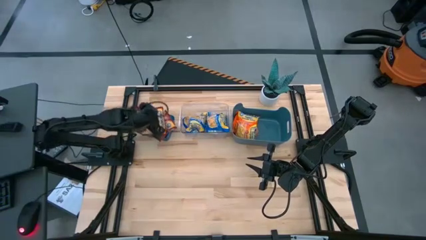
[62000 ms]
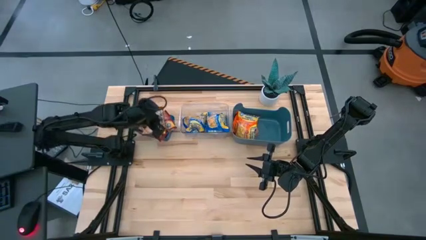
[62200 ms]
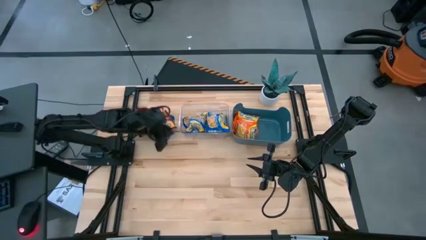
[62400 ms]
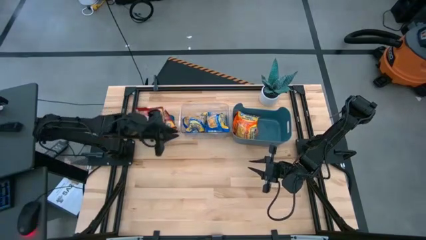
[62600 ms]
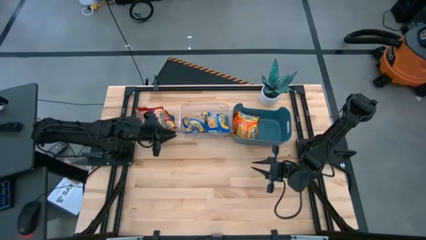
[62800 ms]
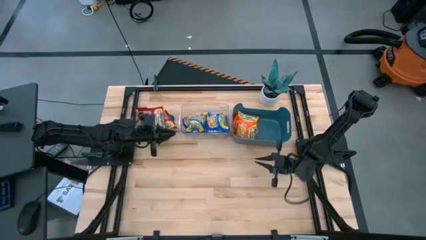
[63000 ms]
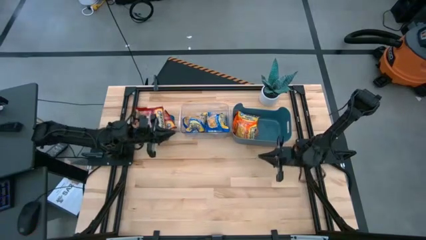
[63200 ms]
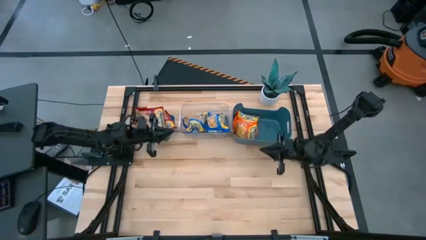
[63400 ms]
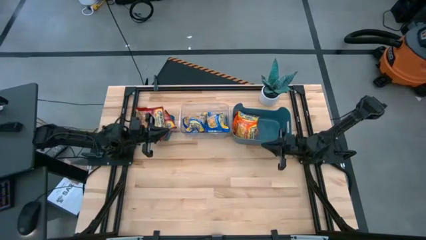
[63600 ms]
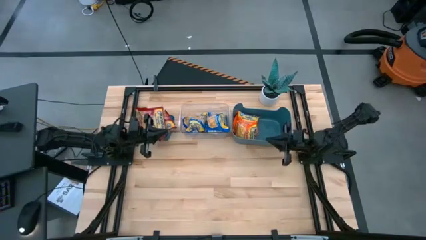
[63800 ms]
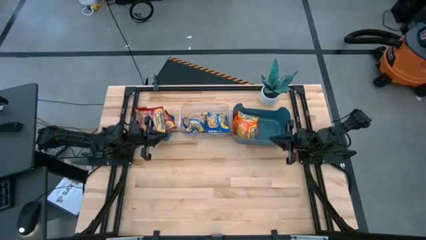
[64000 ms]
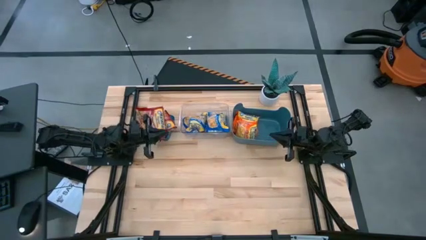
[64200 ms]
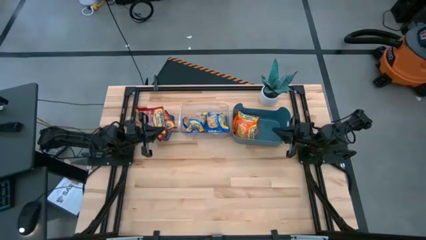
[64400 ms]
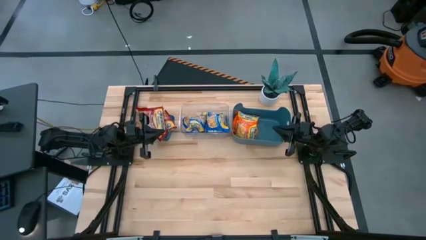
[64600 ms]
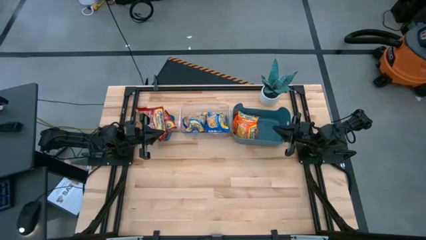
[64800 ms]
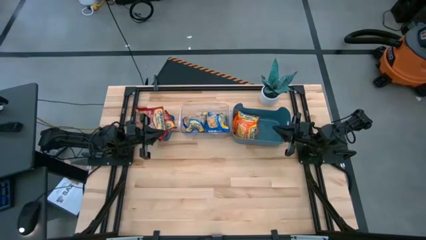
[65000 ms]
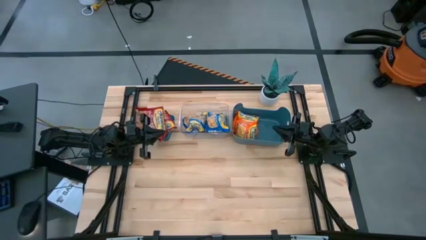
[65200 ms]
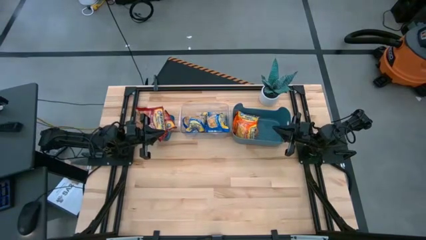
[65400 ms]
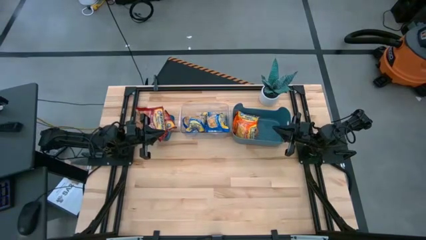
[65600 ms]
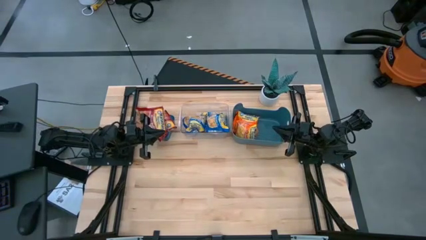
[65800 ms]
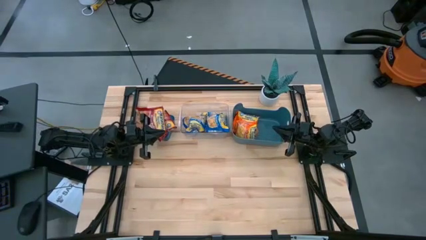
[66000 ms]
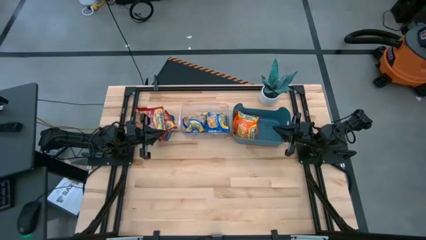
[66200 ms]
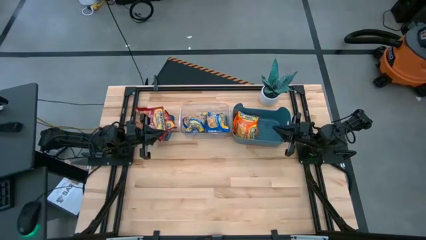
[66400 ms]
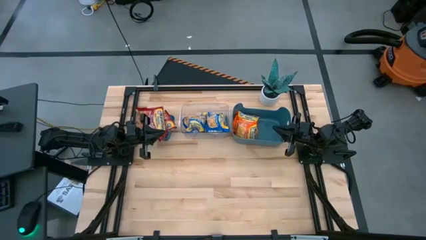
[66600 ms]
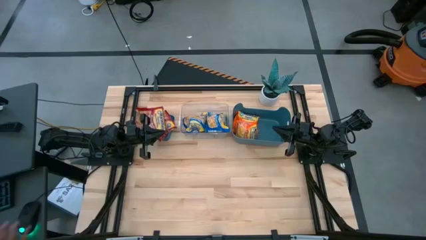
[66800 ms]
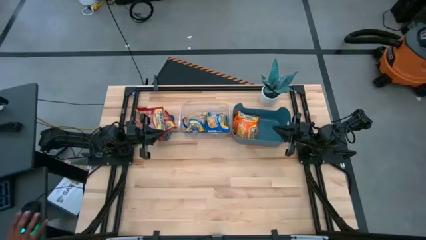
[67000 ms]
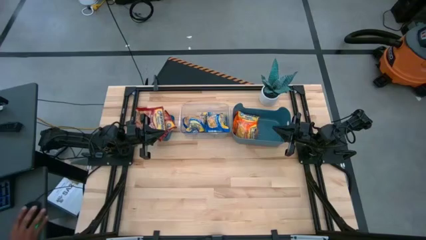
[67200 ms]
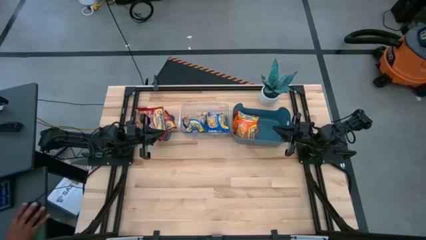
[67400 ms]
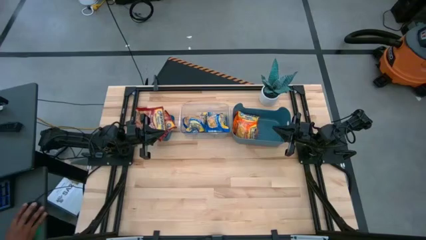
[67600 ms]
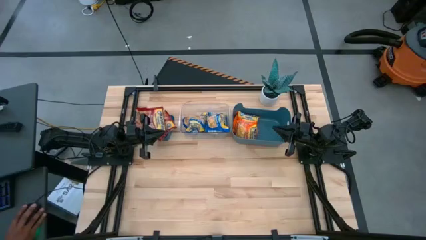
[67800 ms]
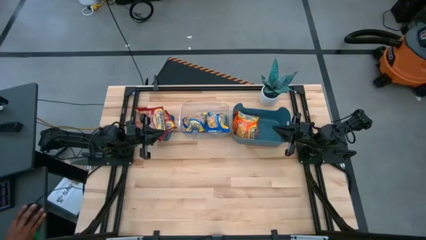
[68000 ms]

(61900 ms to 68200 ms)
Task: Sort Maruchan noodles
Return to Home Position

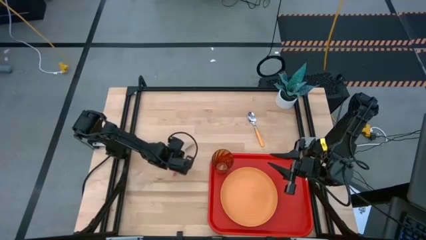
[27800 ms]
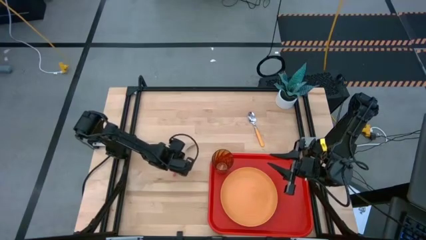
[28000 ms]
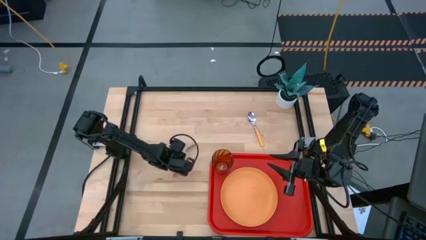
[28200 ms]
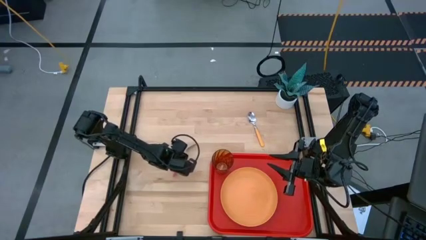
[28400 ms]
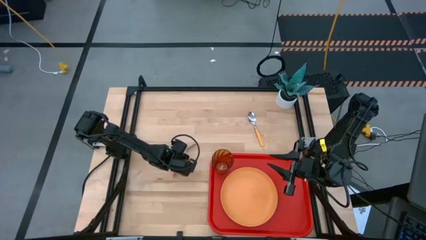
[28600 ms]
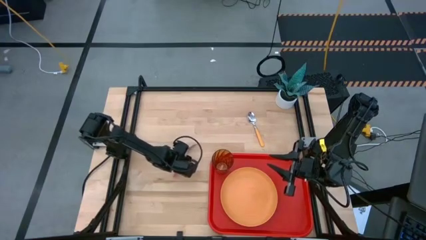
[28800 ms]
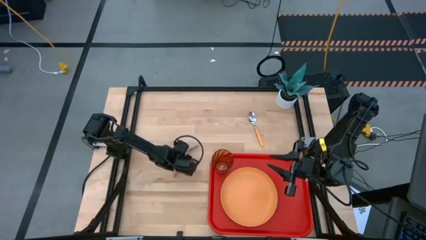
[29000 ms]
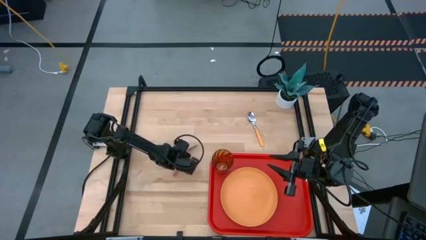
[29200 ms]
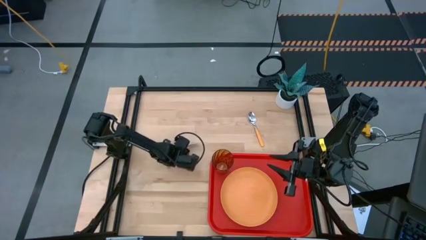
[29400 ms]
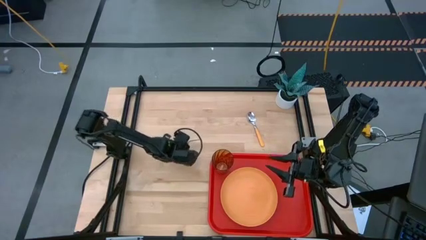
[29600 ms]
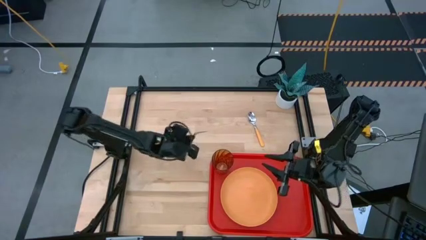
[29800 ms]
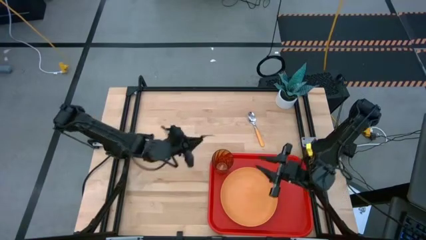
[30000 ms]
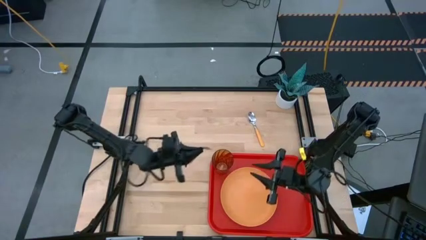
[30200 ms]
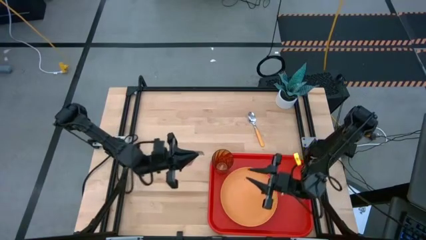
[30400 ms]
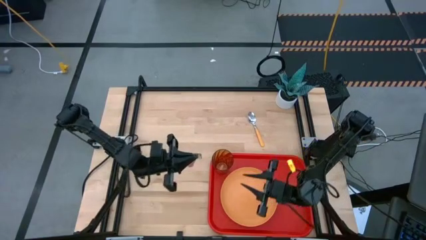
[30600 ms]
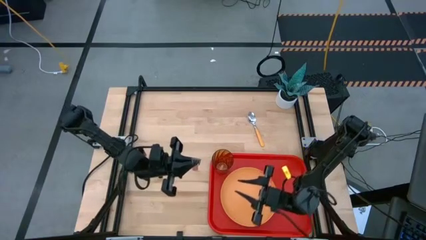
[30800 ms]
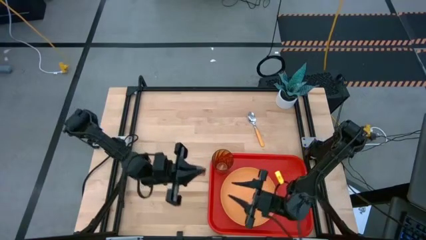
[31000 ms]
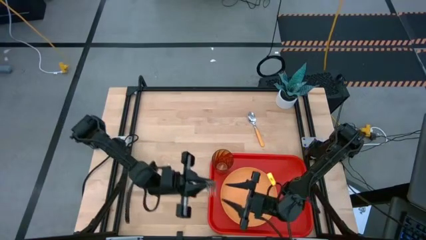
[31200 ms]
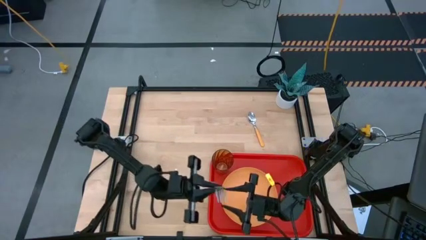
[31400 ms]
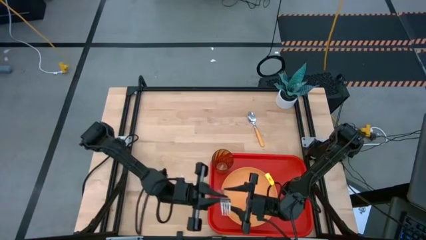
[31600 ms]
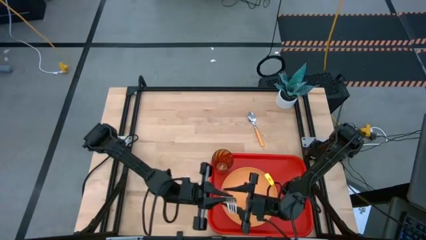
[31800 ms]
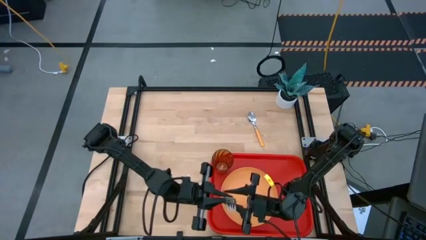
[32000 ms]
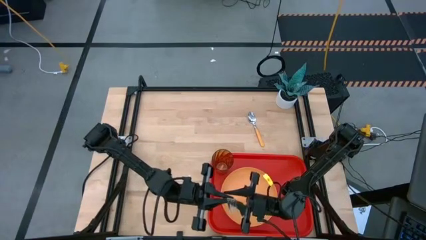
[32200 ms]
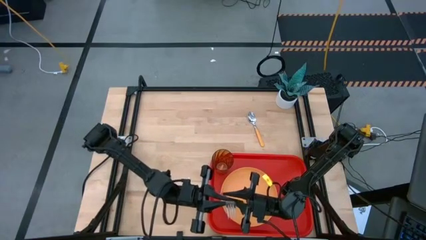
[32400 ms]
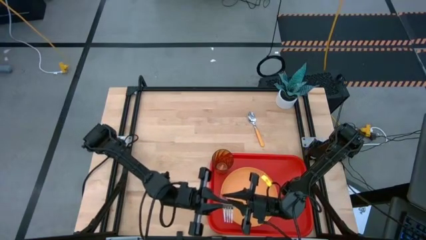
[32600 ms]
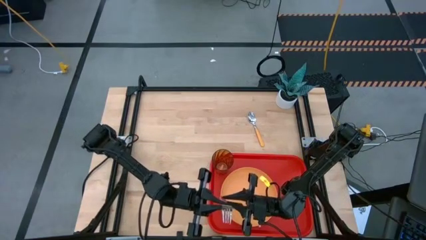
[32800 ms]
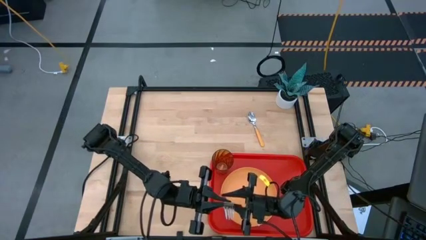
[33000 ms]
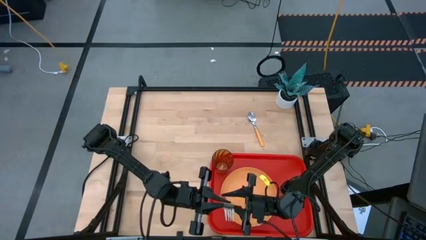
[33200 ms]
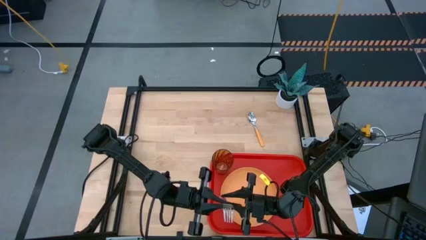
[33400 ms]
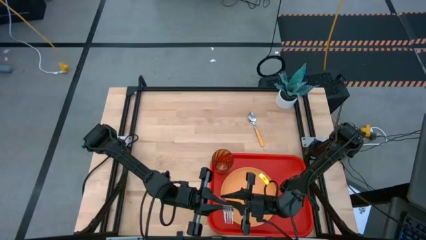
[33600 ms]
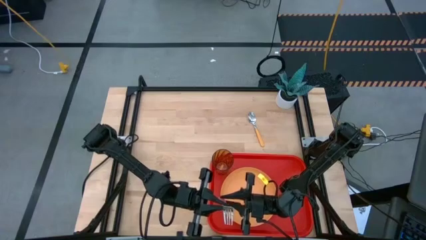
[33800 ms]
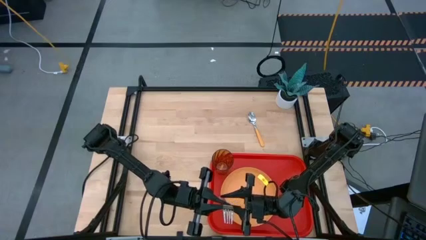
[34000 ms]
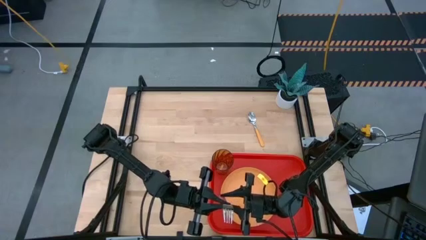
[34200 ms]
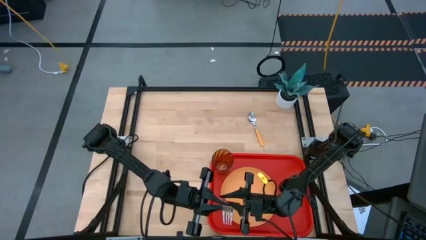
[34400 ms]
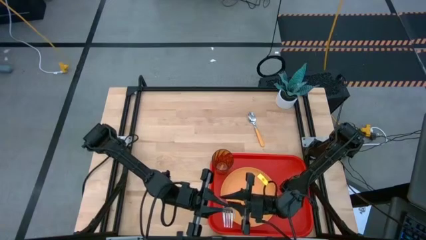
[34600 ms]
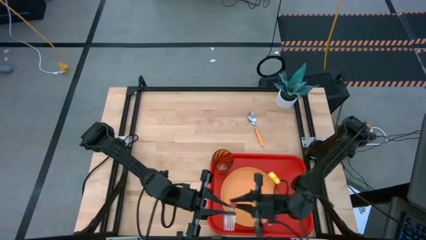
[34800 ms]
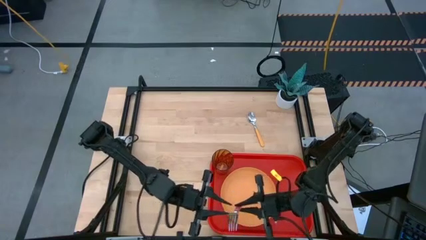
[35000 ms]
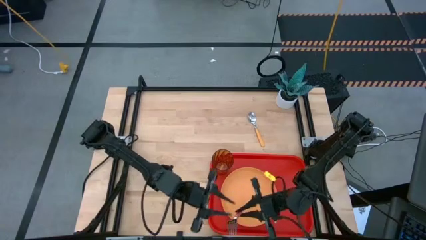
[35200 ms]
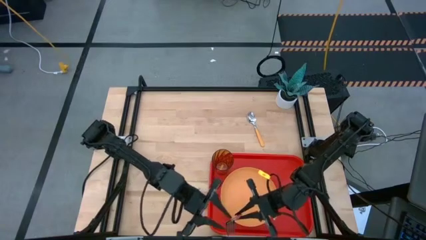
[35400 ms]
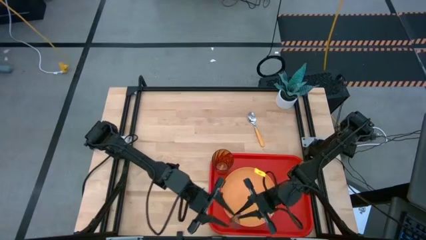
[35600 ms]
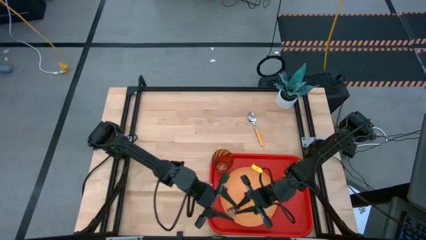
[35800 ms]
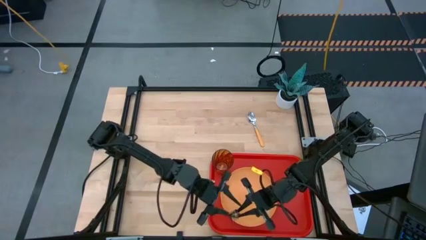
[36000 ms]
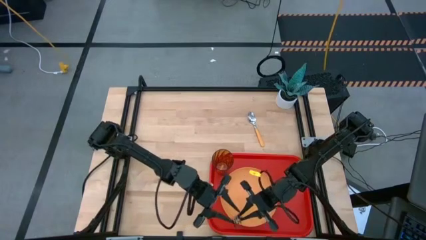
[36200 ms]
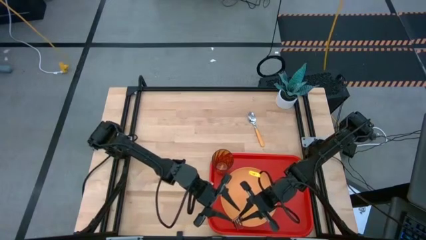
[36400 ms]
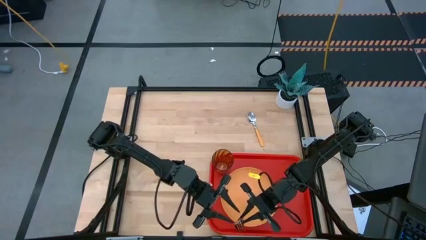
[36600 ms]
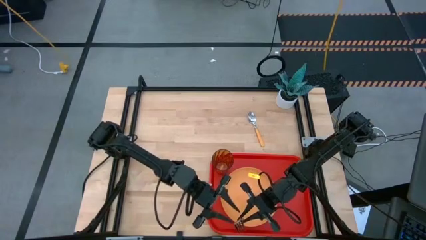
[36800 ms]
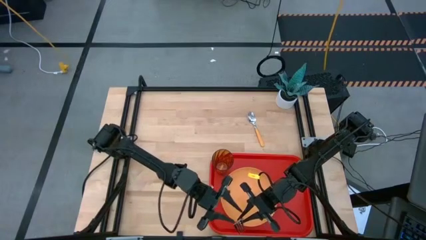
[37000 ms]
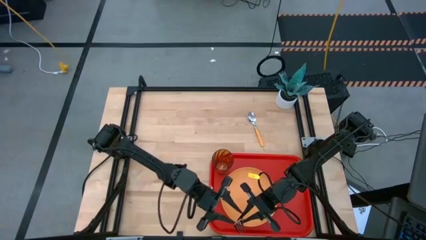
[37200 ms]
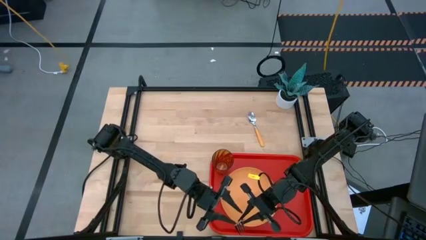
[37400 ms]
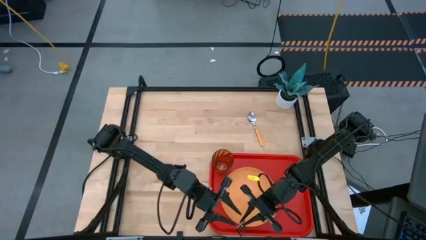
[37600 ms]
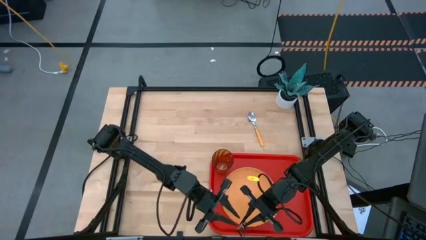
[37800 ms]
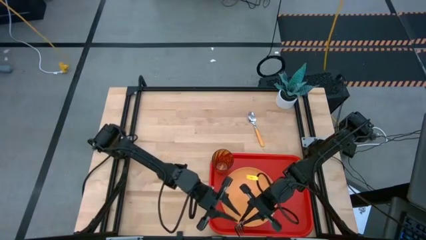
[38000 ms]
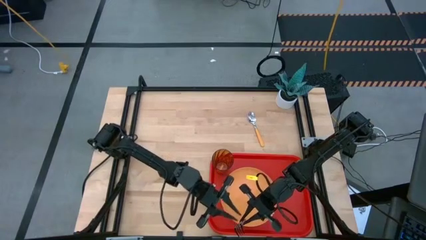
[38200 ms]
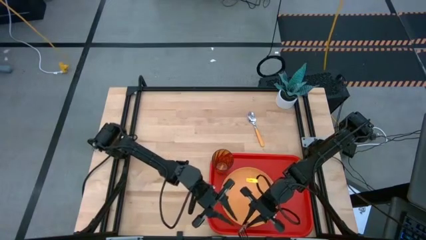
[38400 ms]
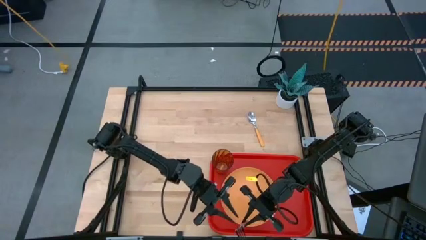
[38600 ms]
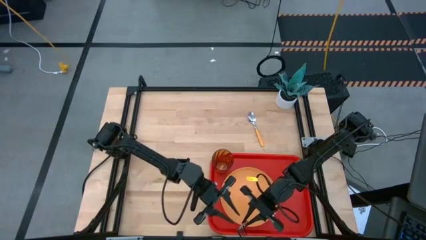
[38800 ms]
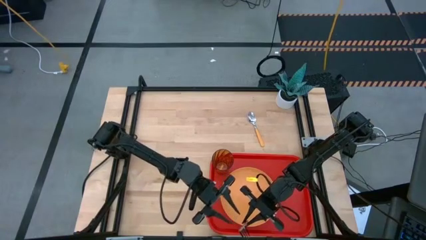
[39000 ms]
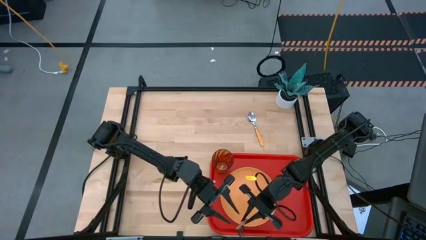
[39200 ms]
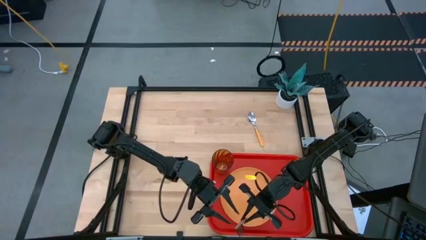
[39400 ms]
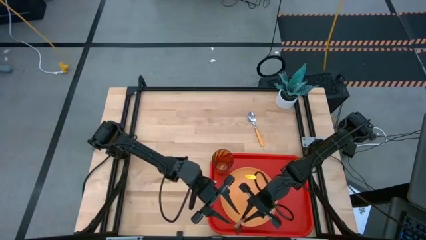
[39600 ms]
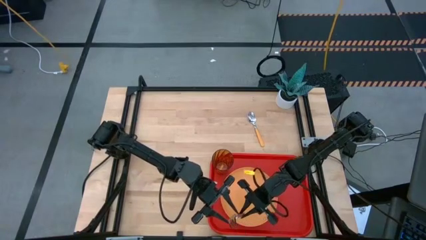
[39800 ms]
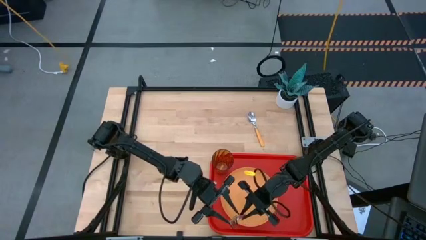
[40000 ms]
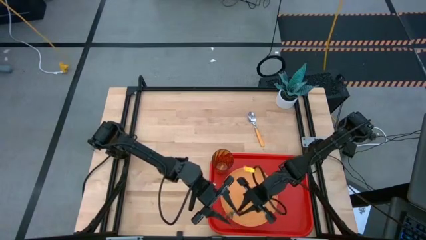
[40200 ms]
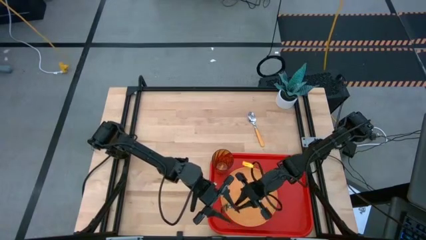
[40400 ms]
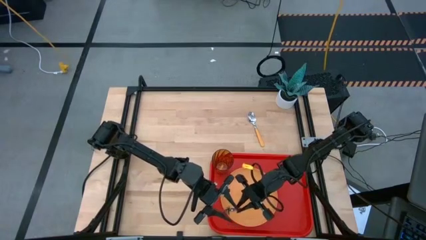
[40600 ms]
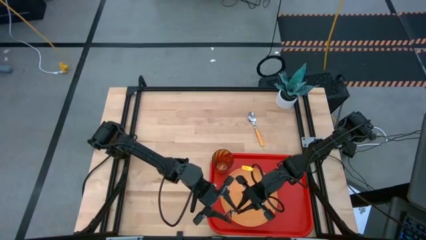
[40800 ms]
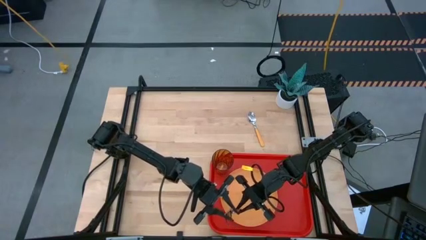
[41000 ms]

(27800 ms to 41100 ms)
Task: Pick and place plate/cup/fork/spoon on tray
Put the pink fork to the right of the orange plate on the red tray
